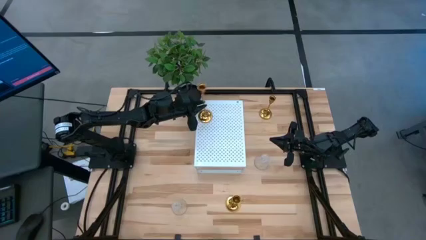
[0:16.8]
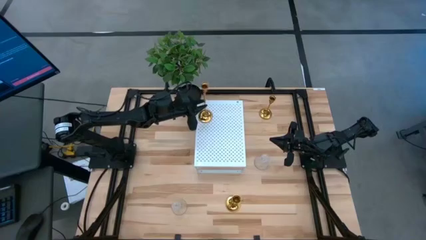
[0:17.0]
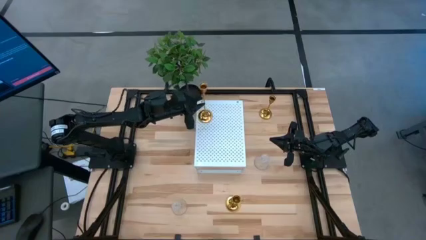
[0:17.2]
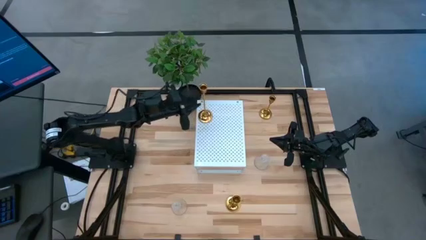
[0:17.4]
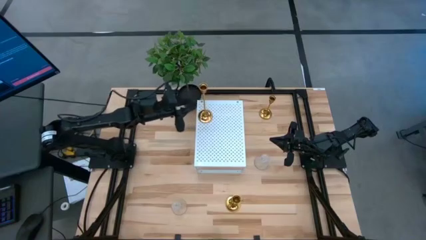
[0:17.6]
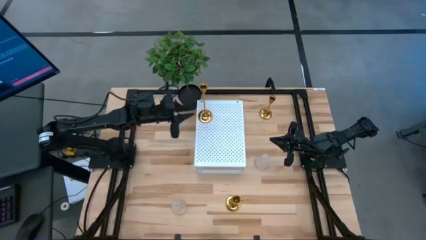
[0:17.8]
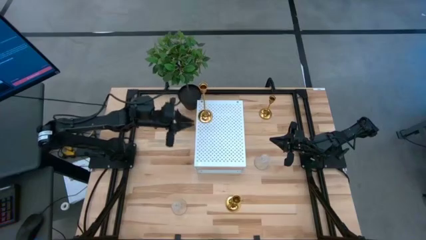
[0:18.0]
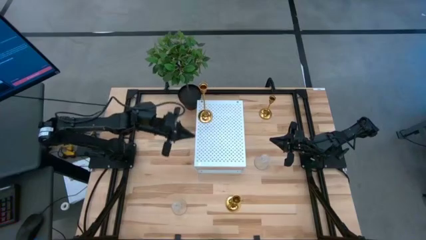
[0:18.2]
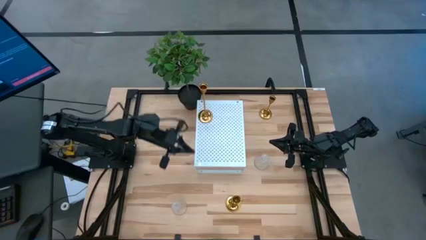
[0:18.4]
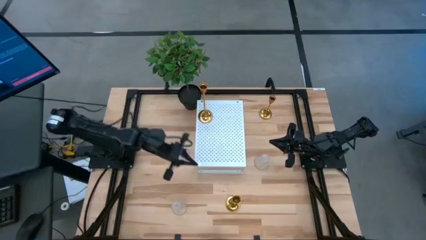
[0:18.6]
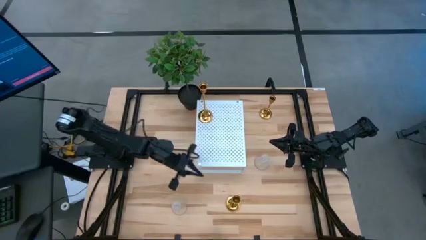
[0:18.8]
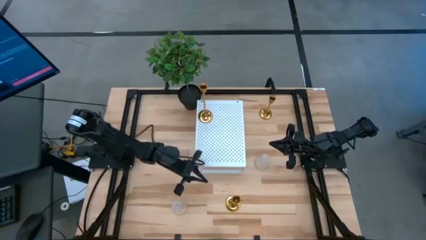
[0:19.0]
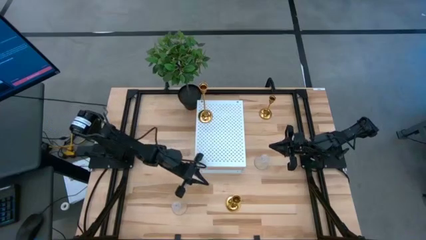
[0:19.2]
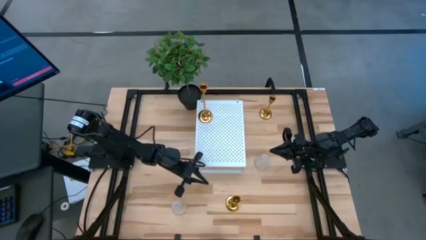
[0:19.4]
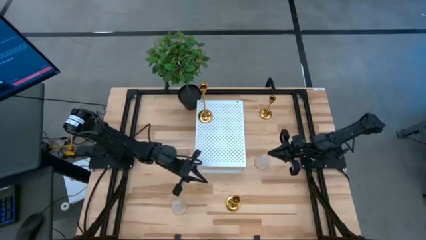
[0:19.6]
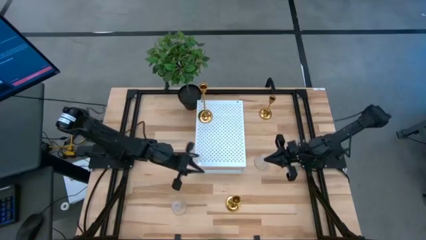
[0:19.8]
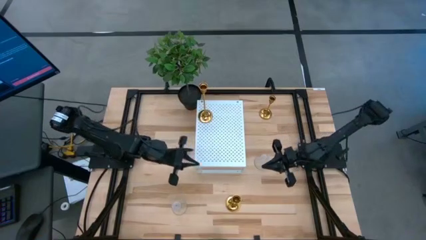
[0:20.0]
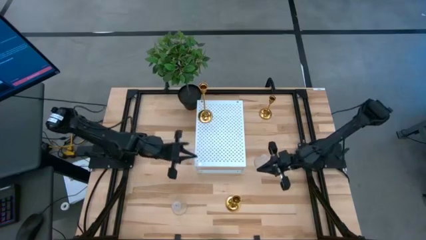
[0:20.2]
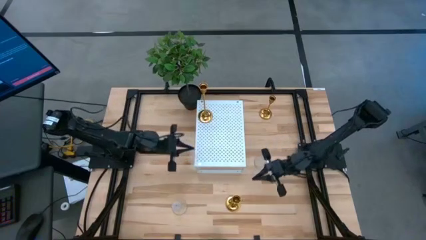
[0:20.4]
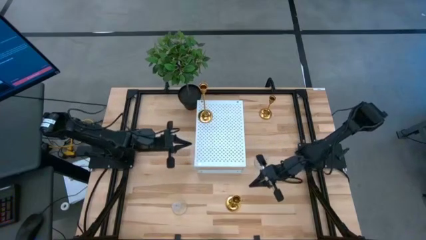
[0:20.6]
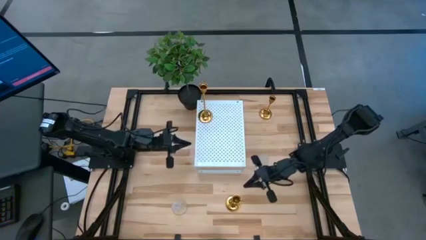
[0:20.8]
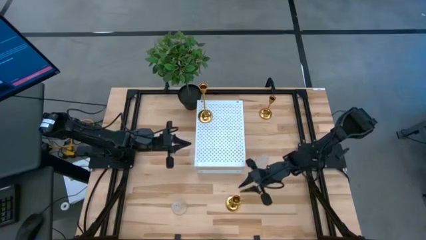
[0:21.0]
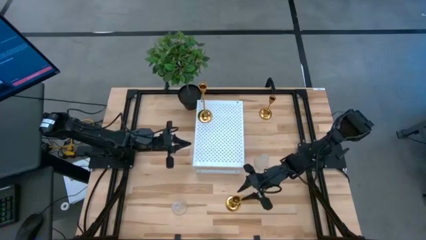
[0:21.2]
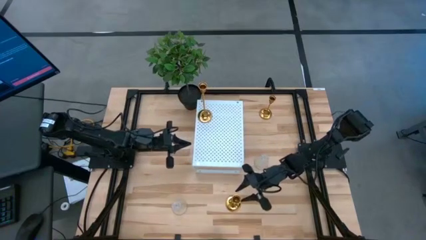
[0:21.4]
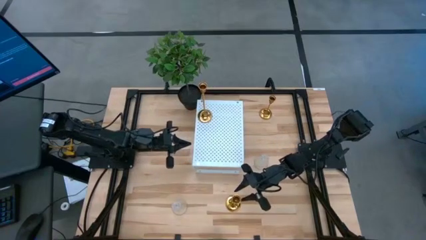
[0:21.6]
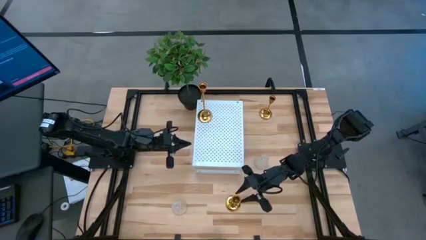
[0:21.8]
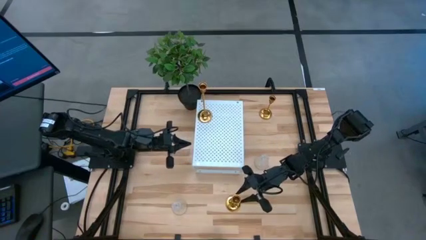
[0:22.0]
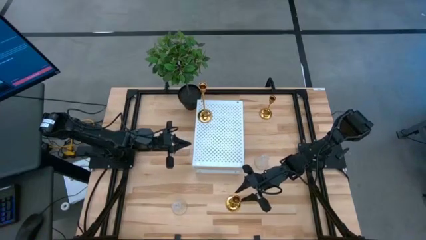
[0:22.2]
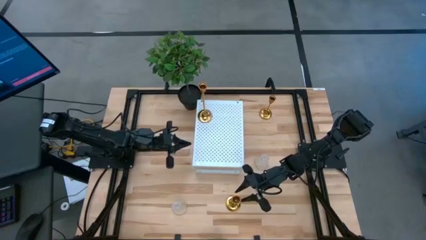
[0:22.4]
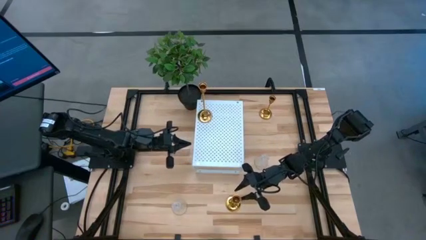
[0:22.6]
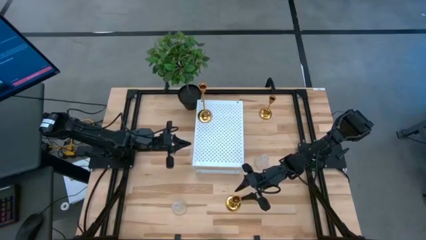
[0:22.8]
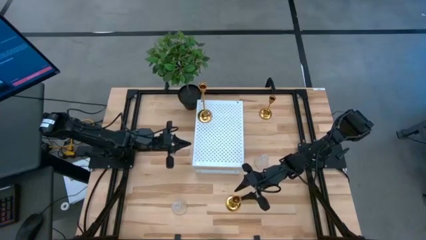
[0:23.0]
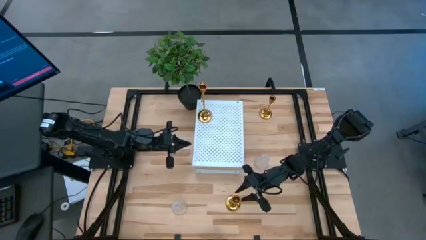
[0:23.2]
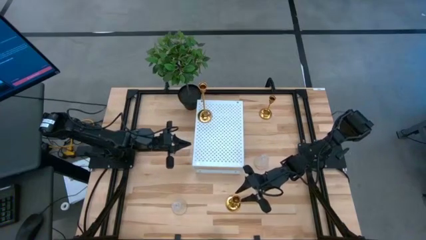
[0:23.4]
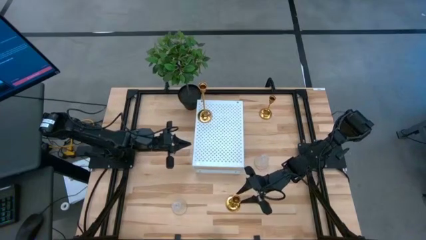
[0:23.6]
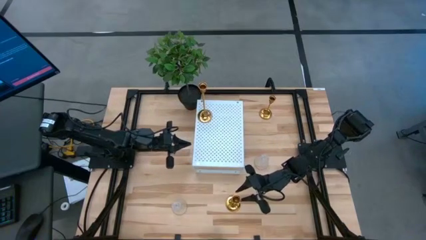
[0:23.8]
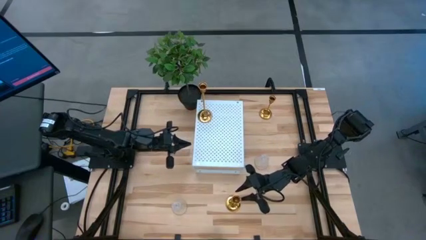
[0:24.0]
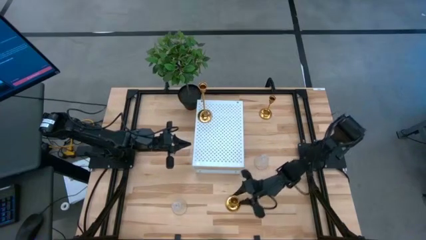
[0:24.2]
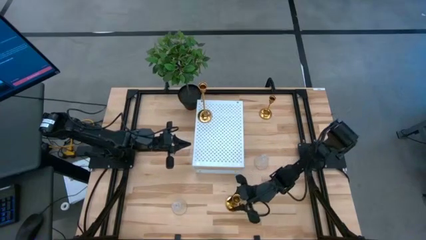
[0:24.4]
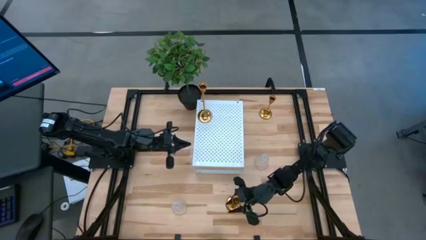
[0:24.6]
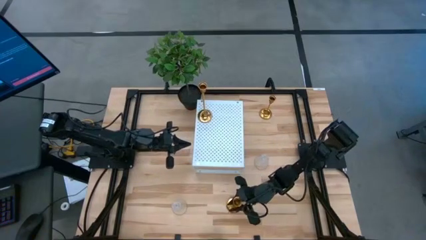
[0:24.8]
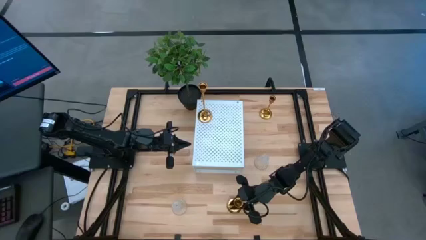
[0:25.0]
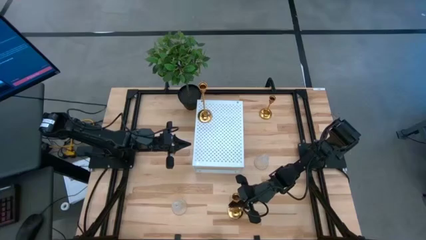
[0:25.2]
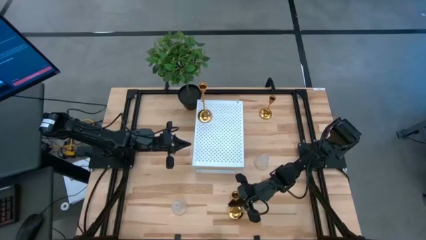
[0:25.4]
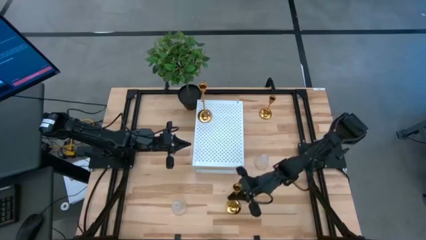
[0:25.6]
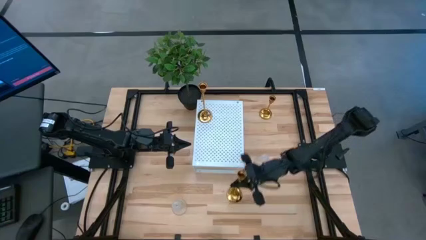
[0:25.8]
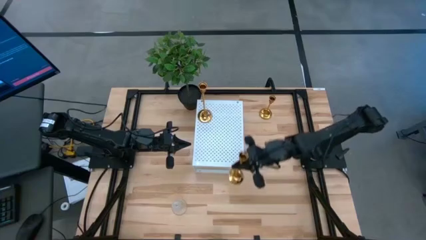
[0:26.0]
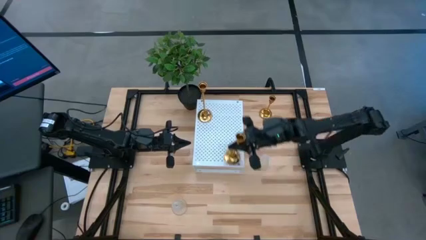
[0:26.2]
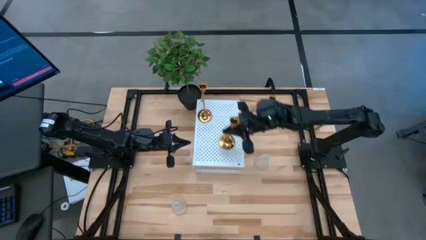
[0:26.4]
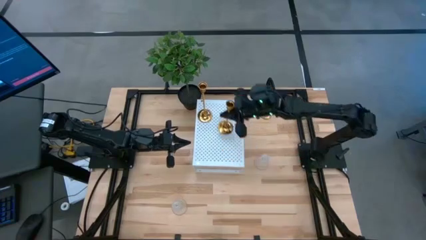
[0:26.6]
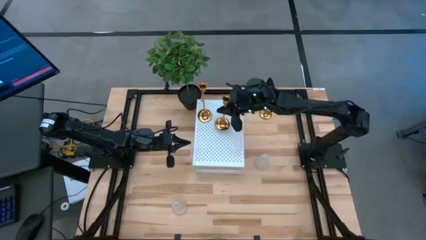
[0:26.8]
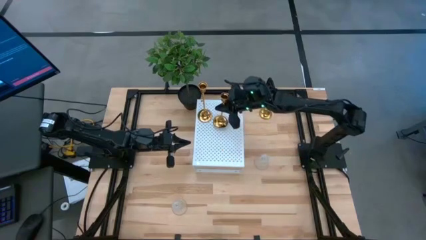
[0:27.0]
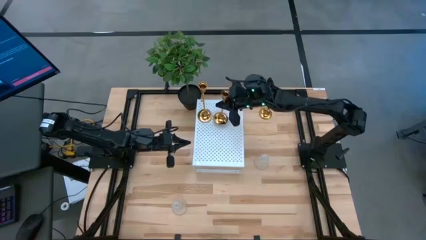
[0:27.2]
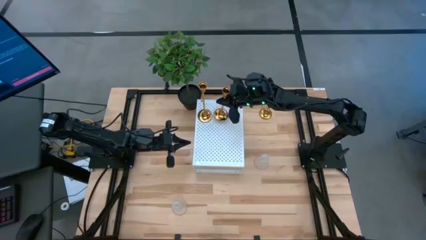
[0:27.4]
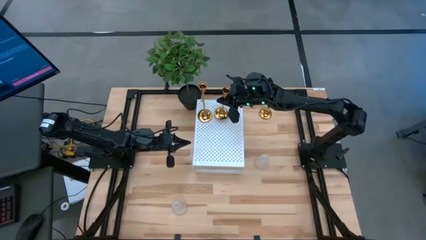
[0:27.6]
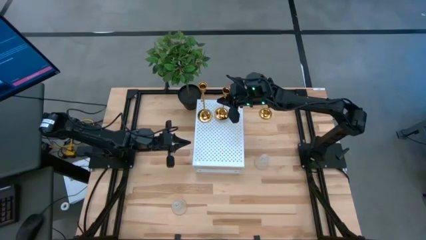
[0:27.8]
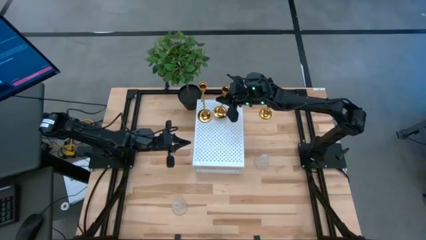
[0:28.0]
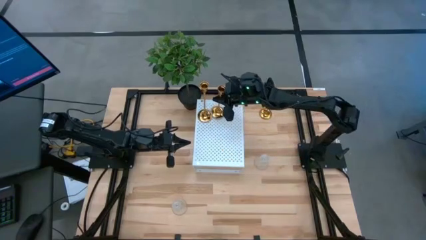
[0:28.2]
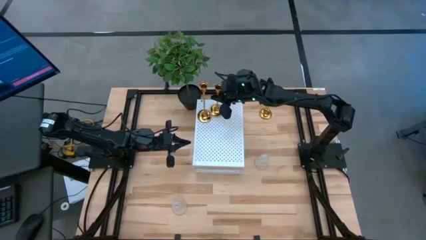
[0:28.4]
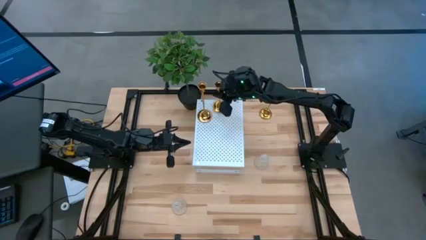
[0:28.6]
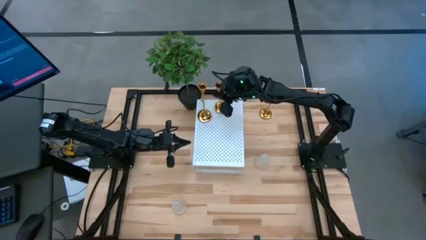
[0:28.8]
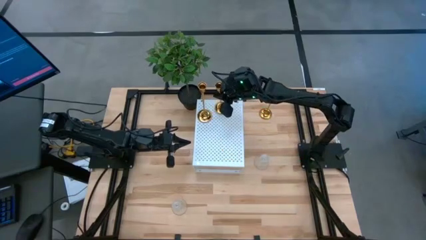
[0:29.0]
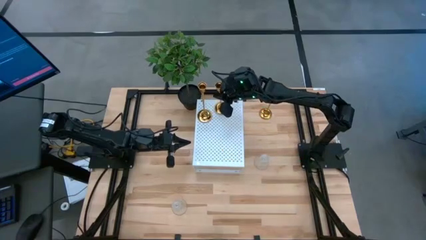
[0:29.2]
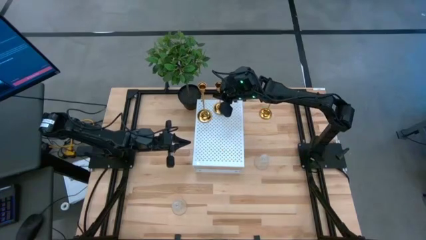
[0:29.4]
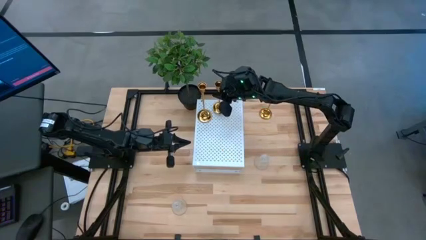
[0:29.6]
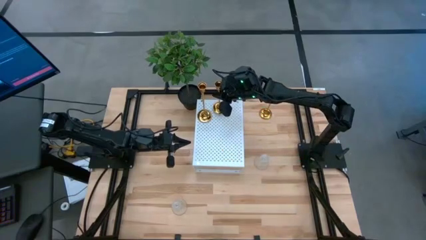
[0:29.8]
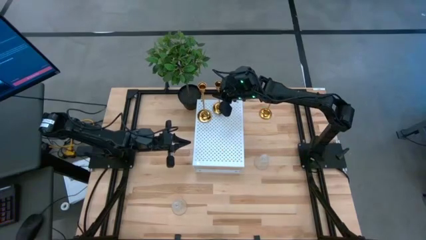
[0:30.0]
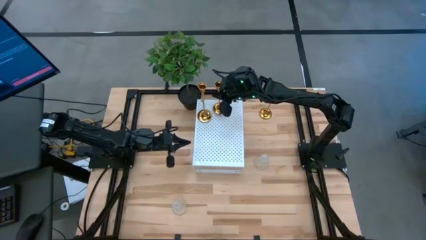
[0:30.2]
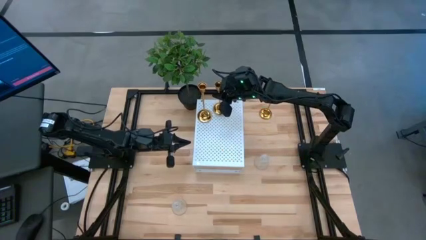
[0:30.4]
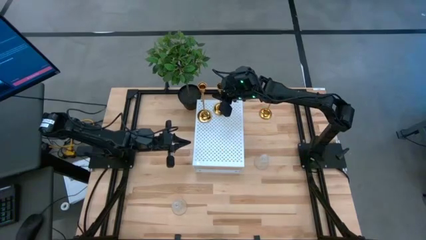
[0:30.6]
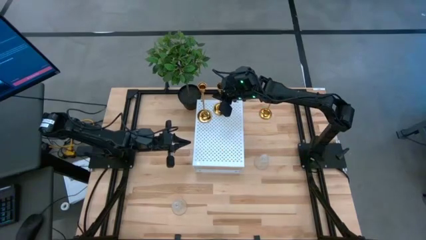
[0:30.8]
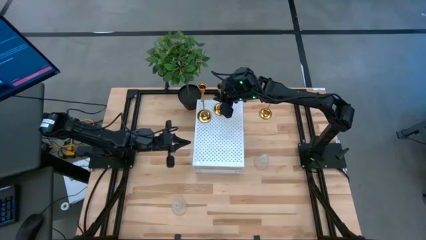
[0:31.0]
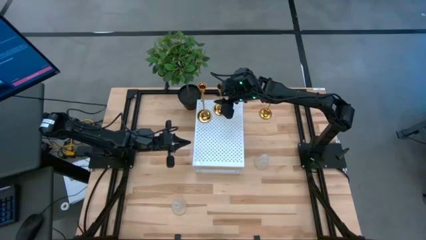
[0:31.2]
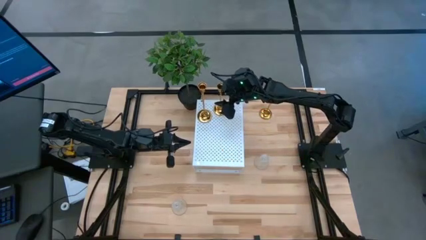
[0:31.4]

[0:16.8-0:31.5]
Task: Pick & Place candle stick holders
Put the bottom gold candle holder on the shelf
